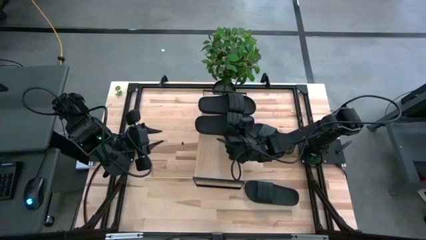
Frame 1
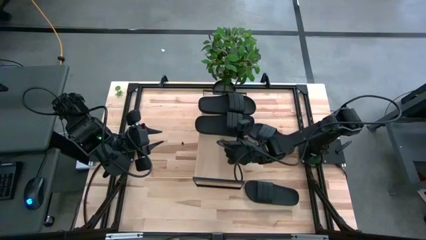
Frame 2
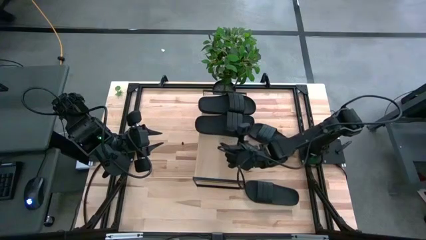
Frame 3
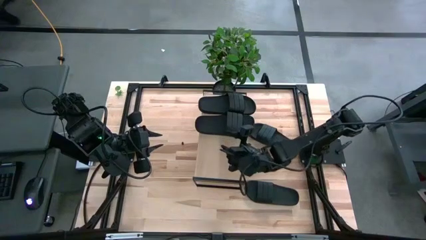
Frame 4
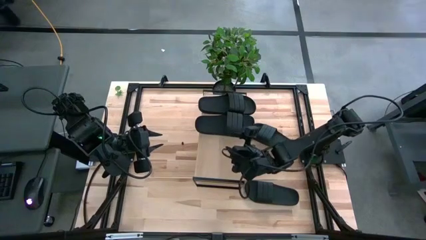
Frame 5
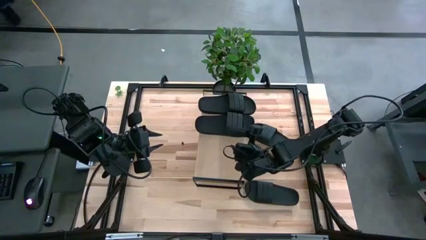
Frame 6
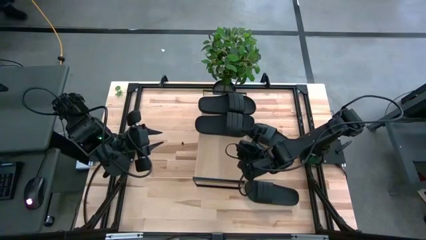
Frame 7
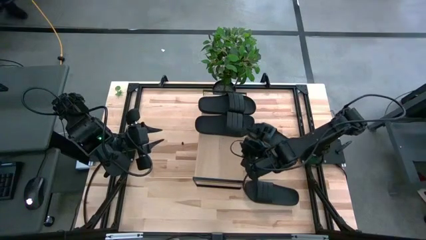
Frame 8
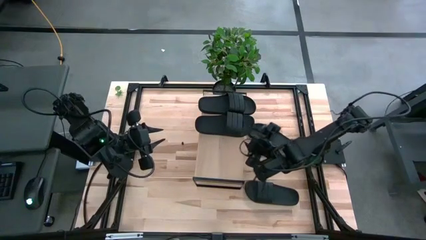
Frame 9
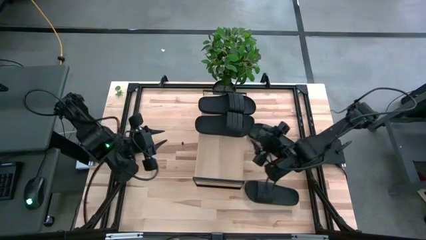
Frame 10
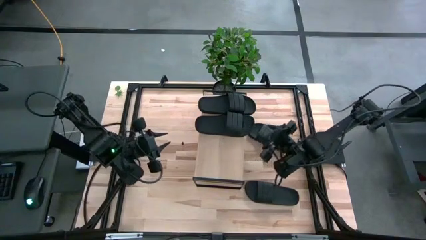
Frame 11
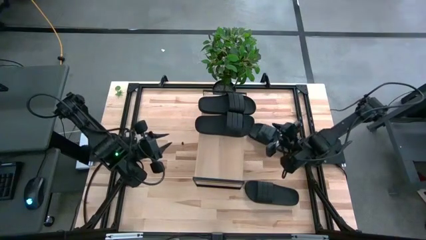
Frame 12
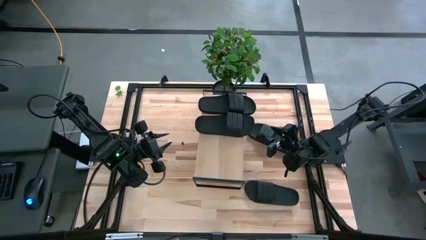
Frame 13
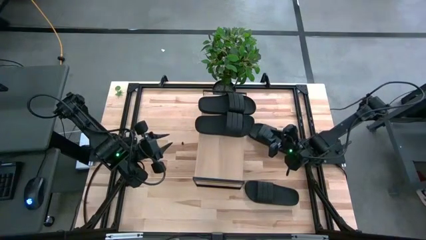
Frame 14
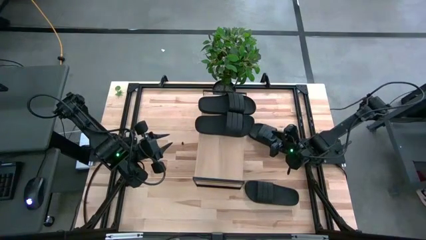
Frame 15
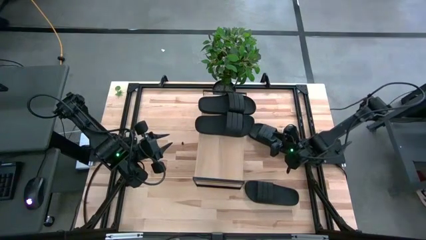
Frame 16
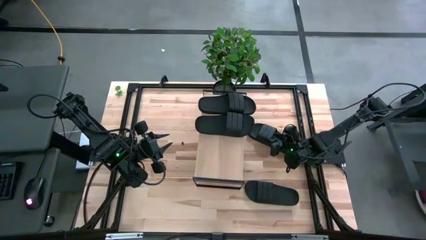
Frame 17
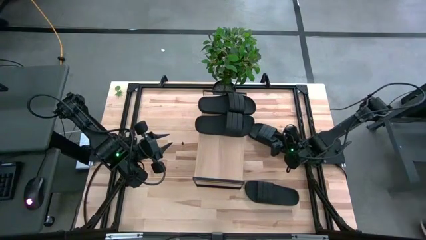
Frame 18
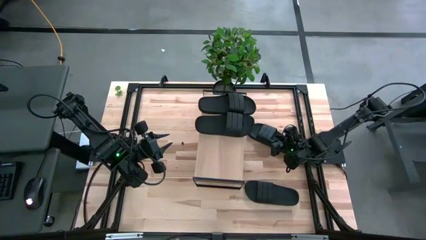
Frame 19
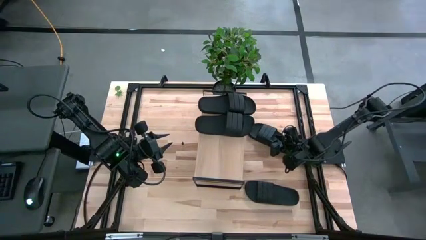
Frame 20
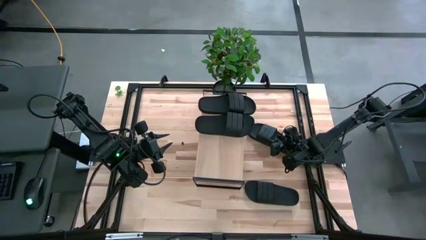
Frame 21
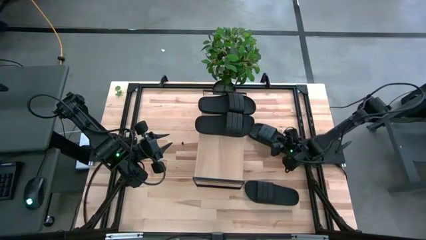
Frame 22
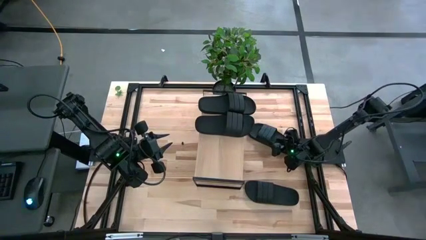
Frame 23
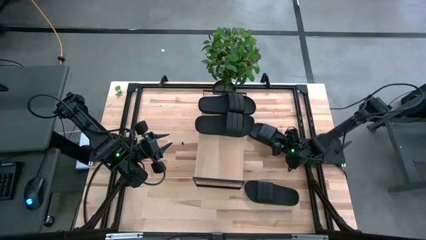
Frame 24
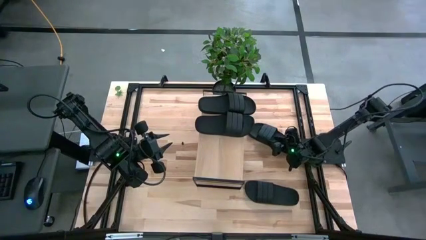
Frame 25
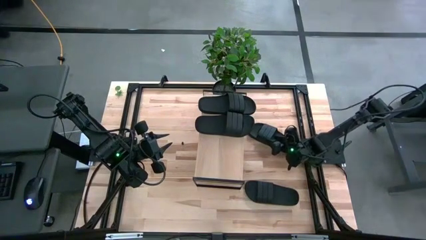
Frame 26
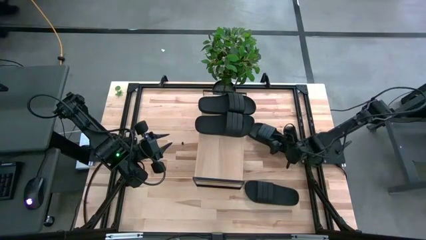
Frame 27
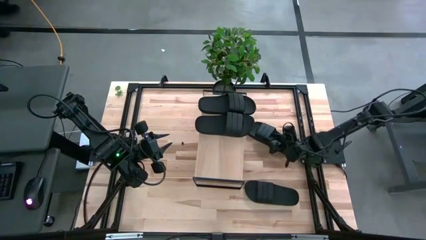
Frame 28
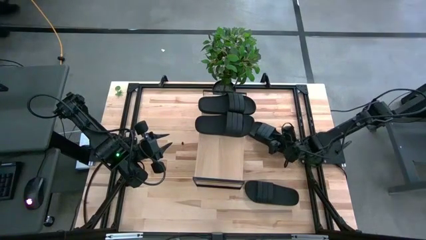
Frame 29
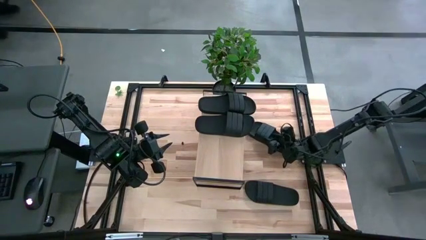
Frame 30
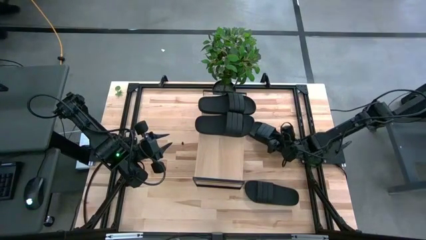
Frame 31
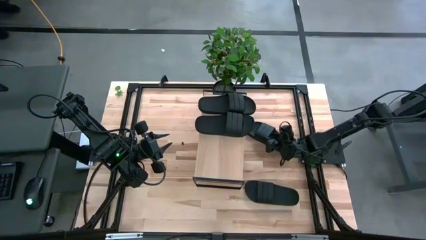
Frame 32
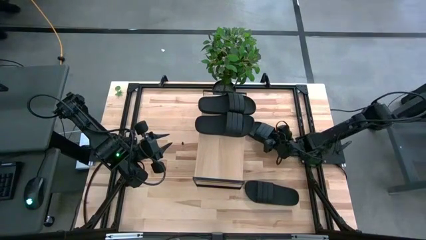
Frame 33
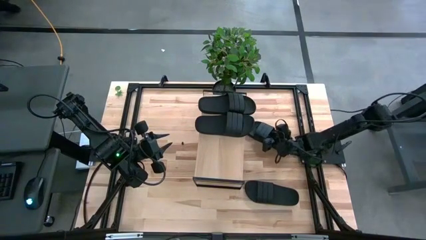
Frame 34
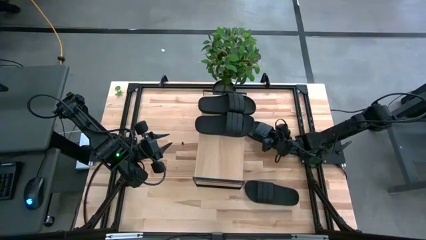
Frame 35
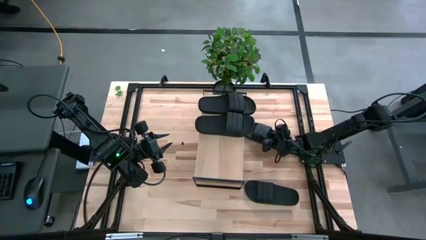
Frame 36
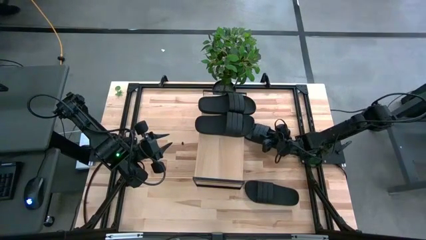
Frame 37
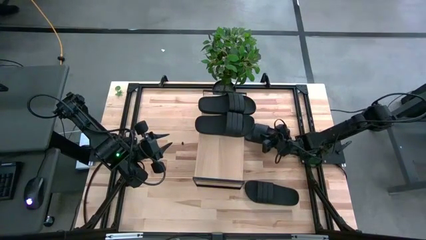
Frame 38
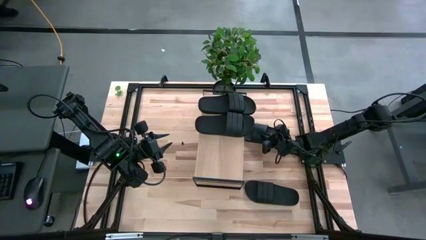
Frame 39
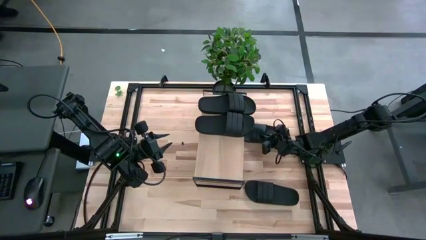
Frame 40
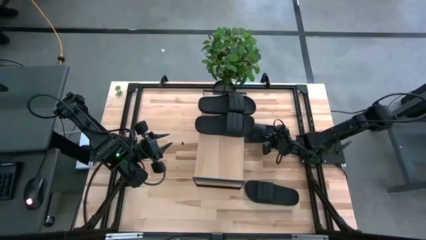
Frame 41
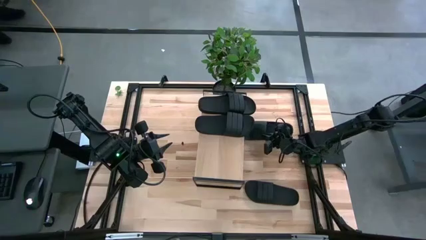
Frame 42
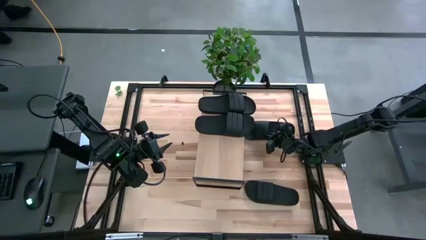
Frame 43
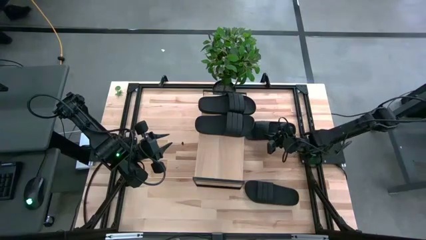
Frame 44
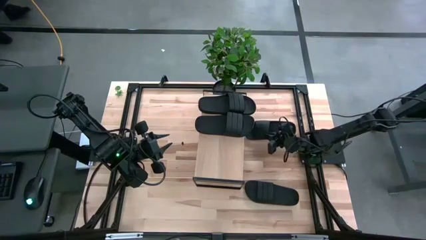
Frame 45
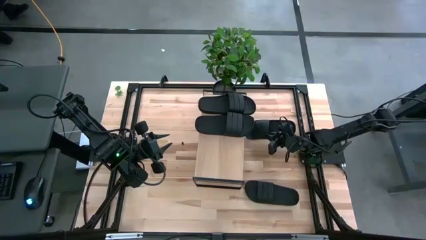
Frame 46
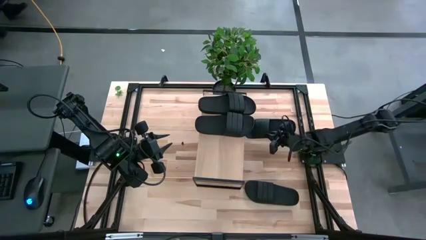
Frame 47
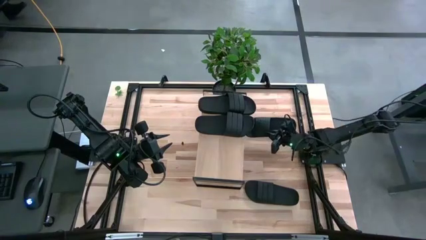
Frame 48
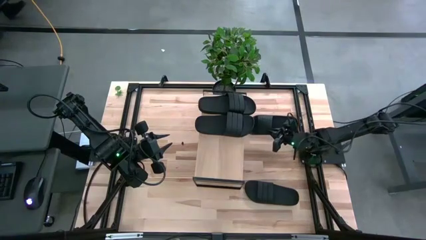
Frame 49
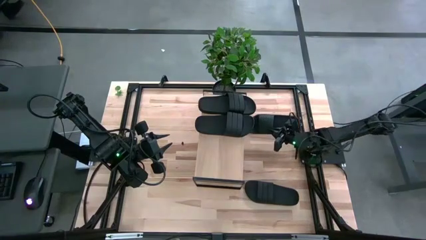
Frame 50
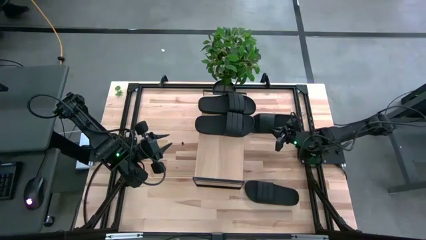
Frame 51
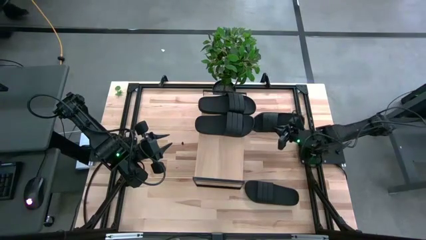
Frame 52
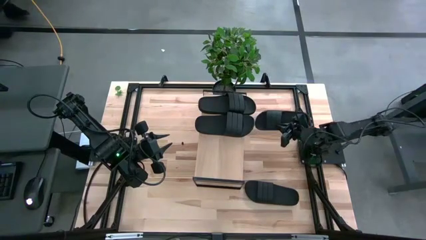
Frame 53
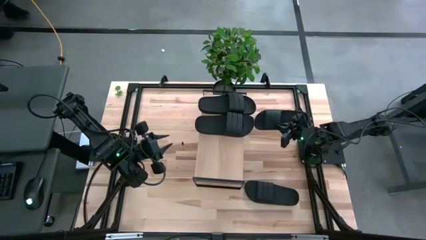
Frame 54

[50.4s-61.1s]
Task: Pick and place slides into the shelf
Put the top slide on the shelf
